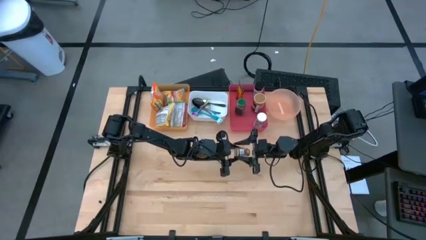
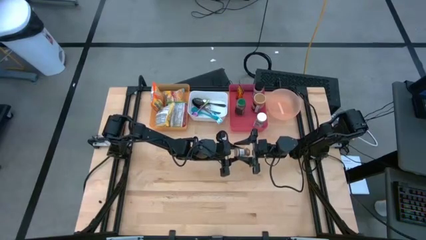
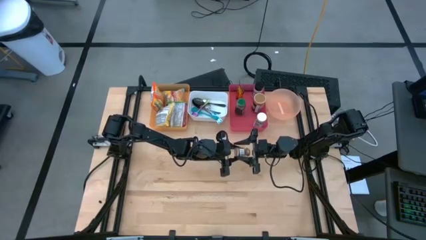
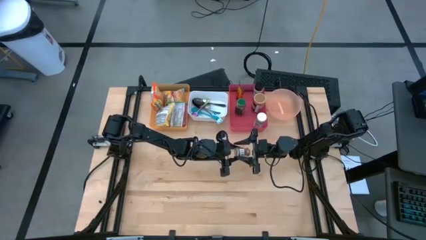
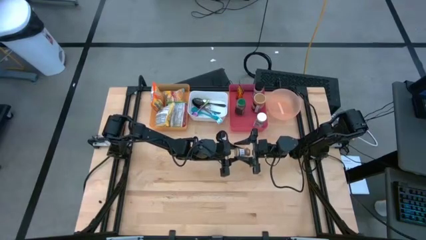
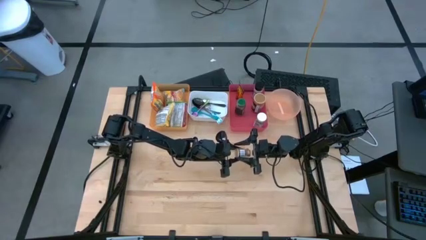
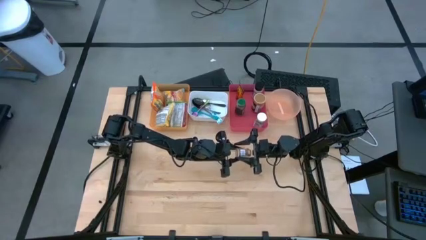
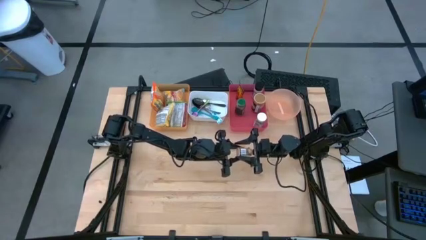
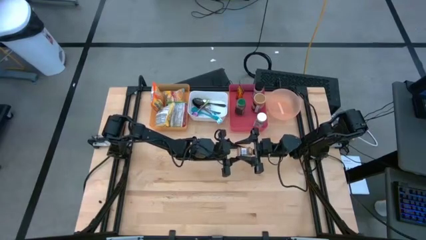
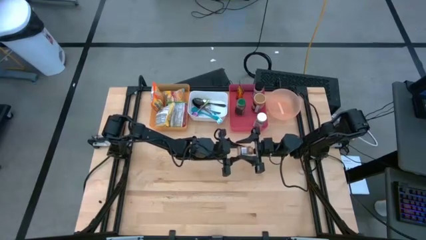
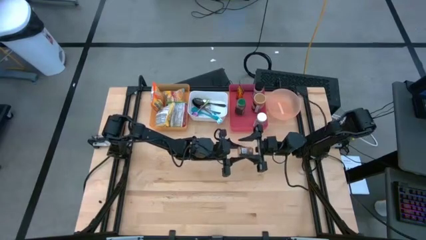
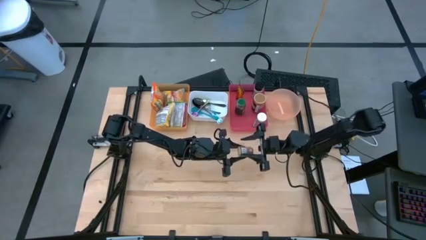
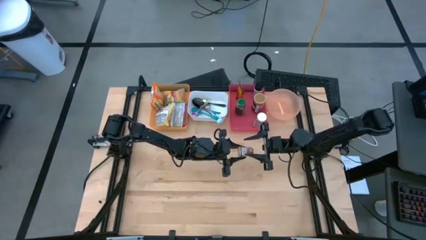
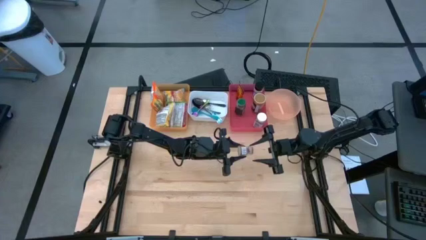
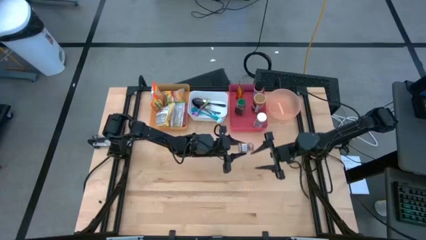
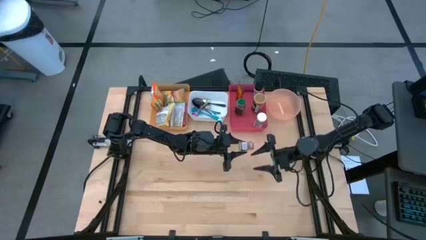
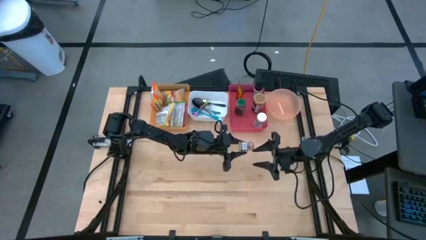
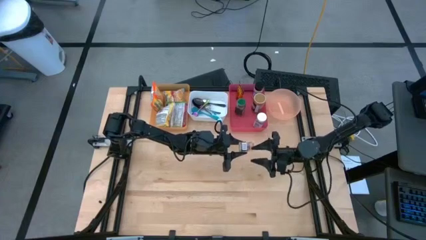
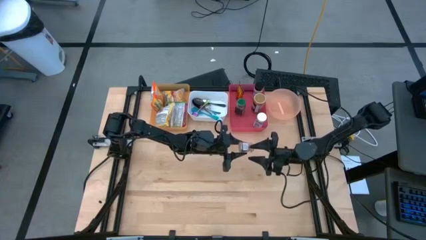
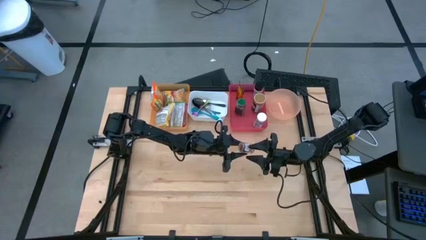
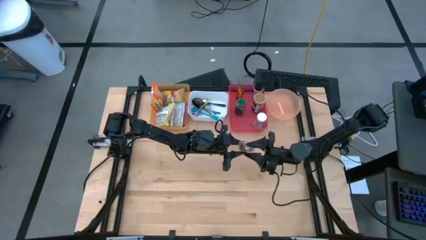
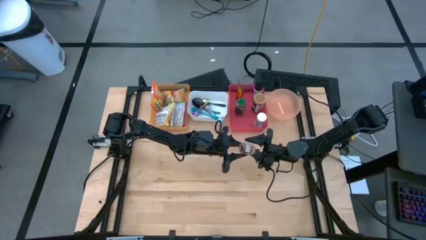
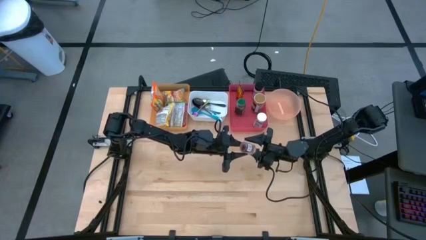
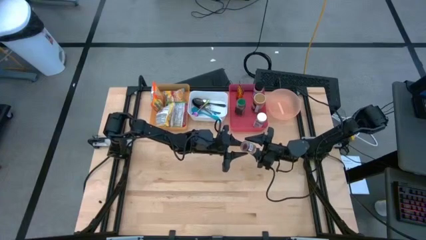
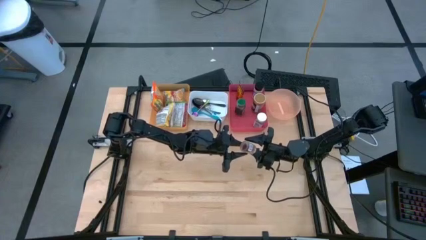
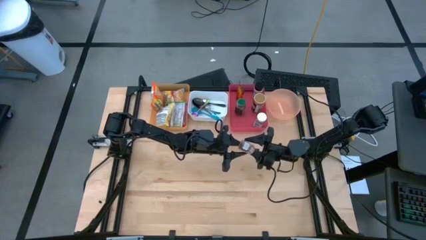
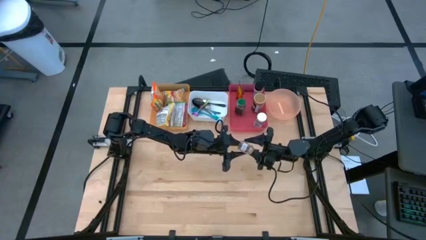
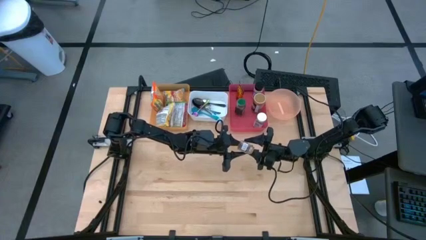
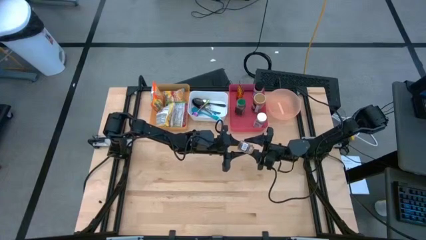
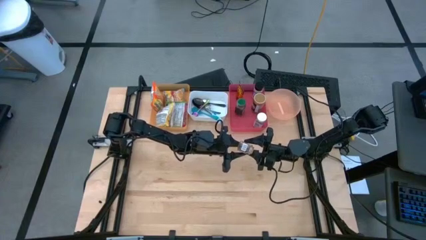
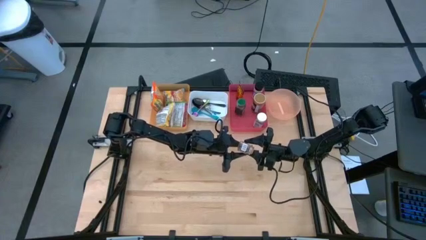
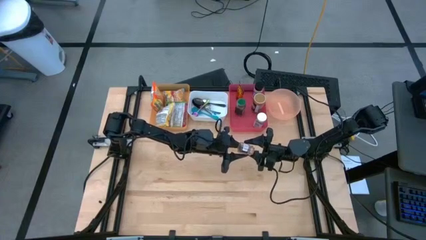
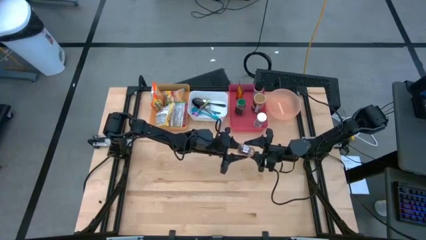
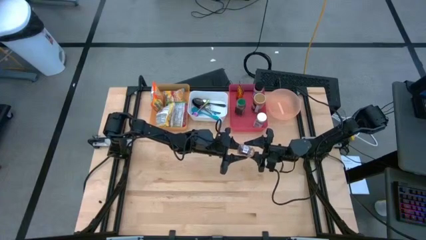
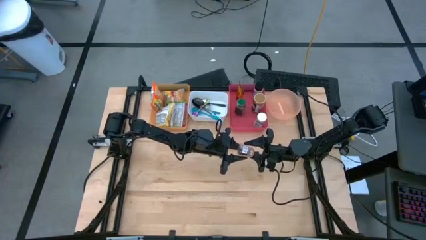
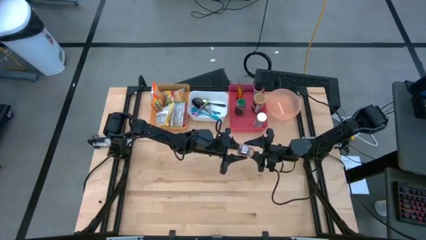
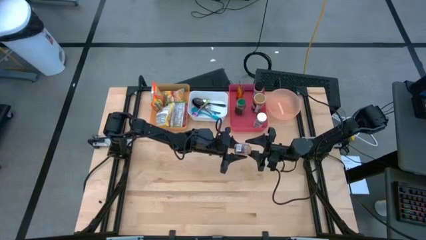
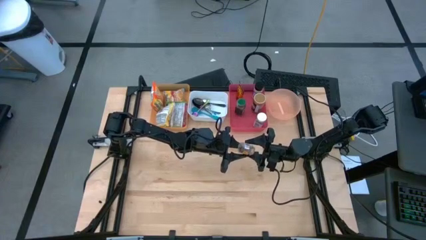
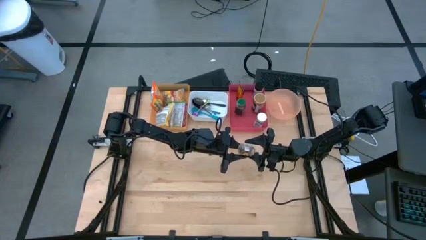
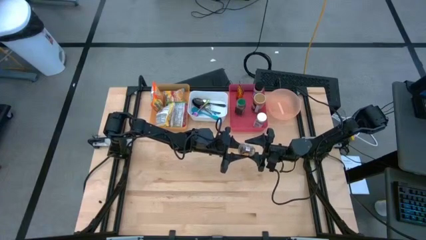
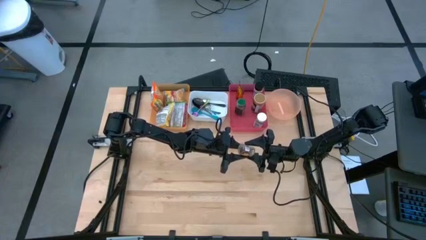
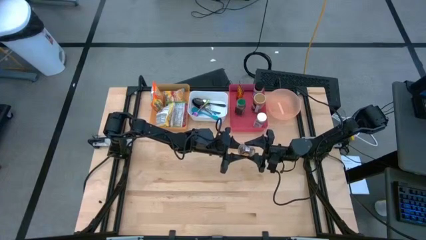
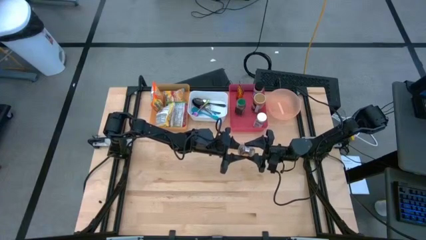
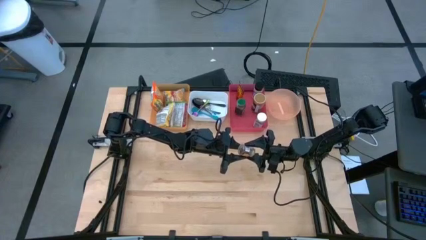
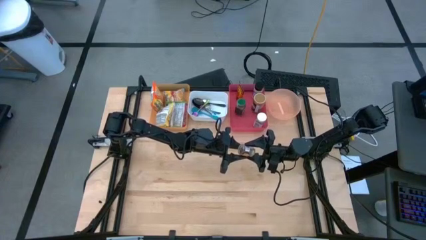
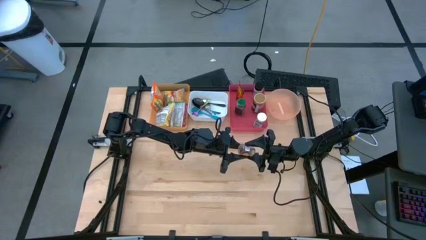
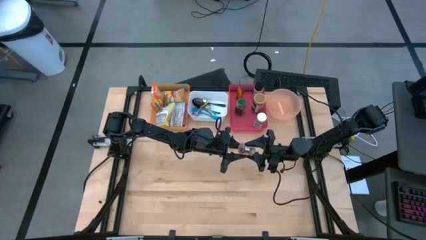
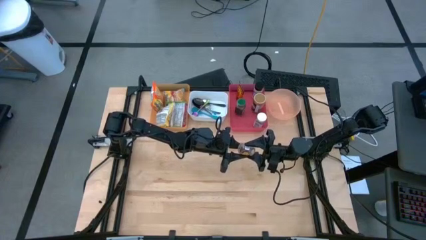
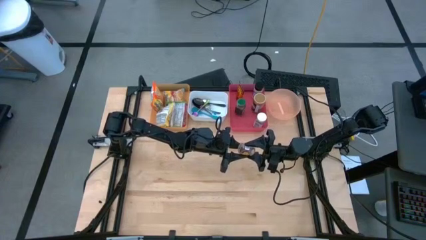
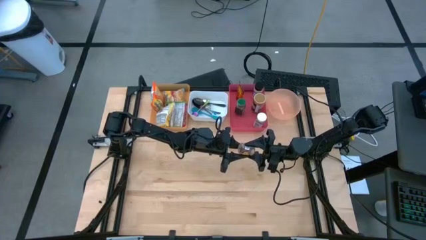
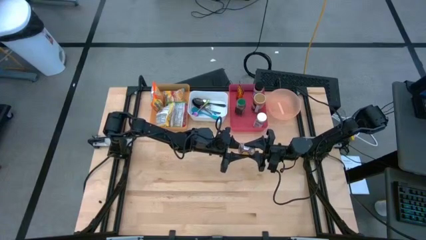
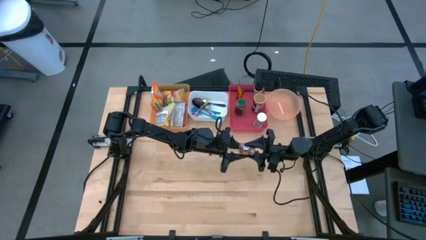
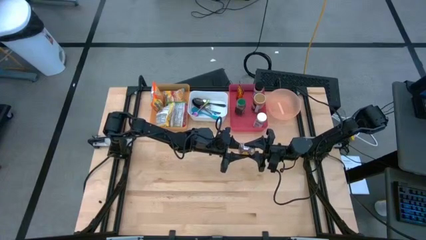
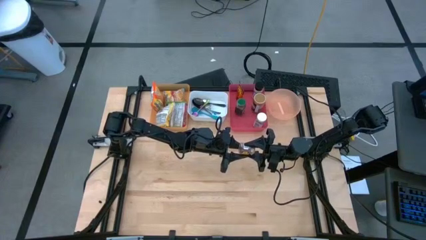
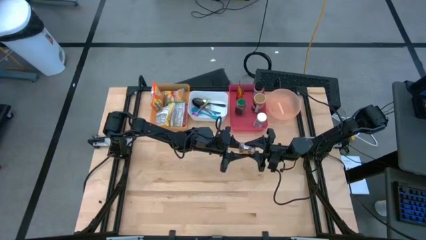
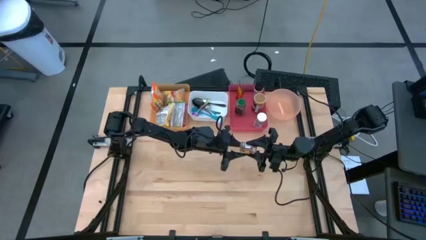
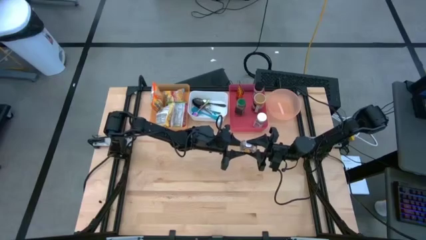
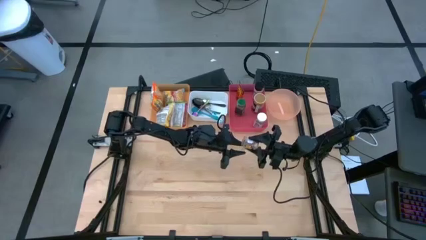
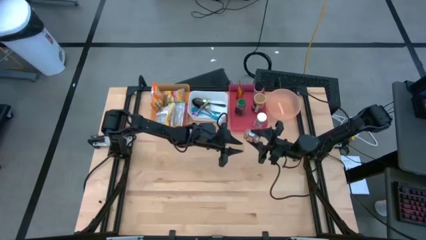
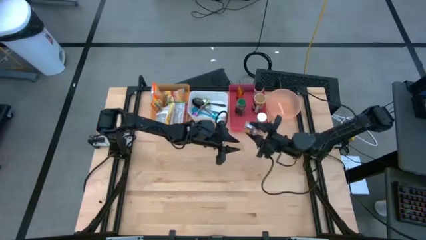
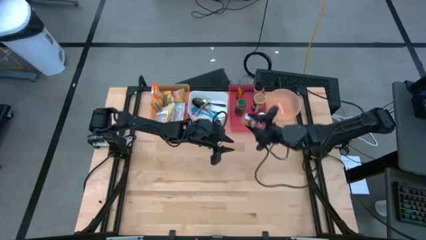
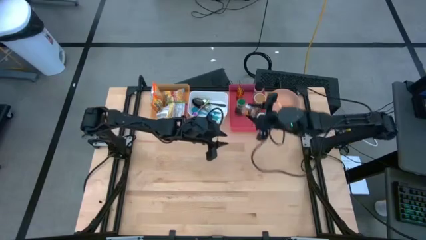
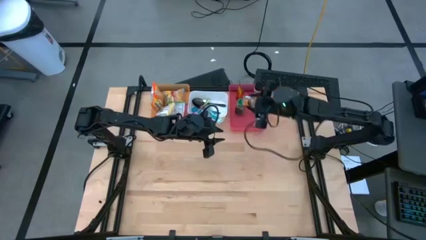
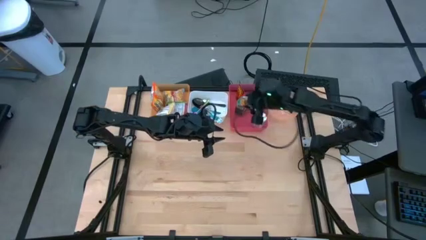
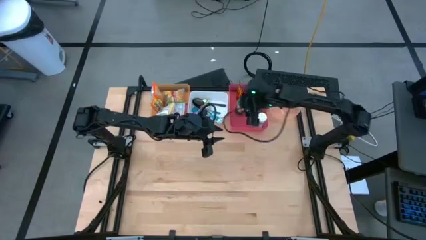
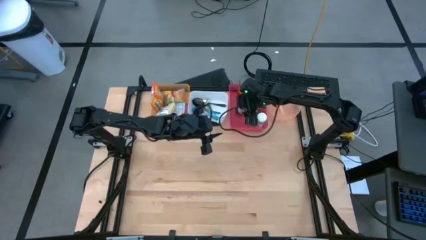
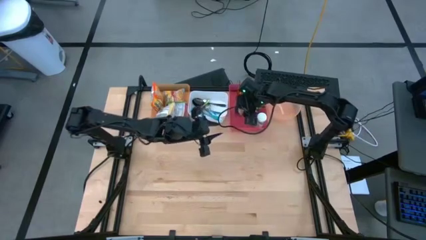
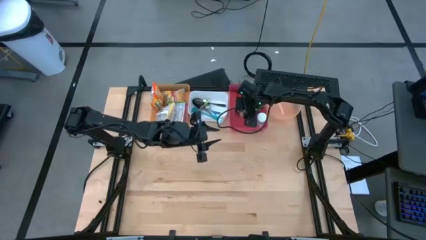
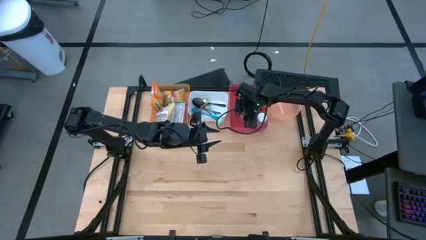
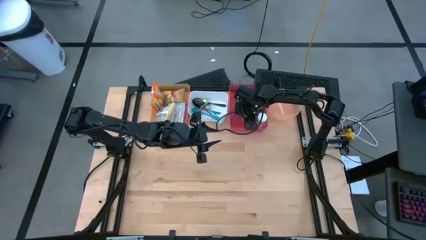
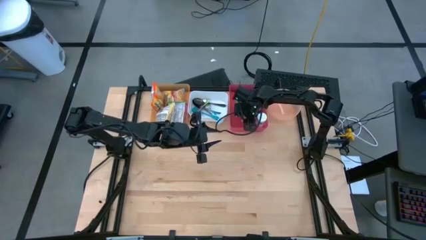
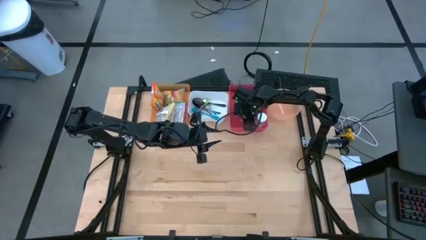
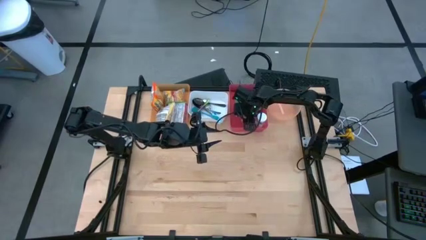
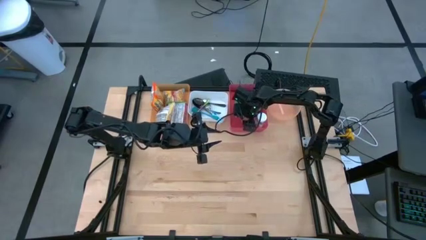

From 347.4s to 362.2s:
Task: Pick & Place Food Item
Put the brown seasoning bottle into the red bin
